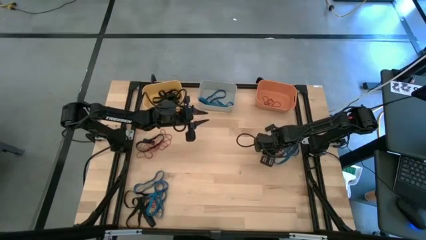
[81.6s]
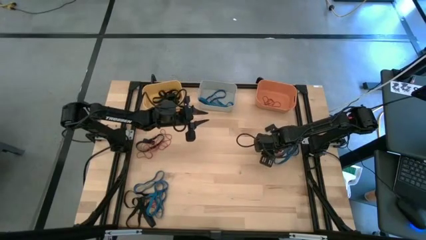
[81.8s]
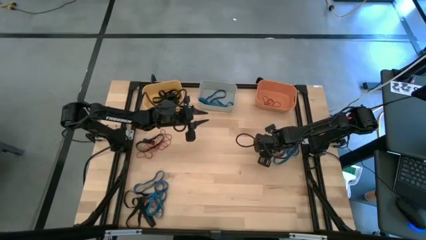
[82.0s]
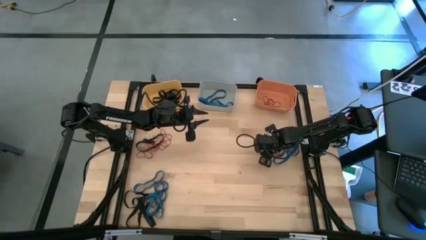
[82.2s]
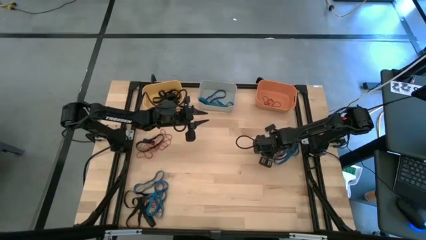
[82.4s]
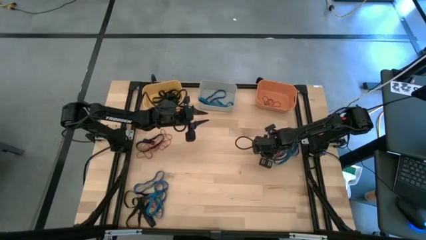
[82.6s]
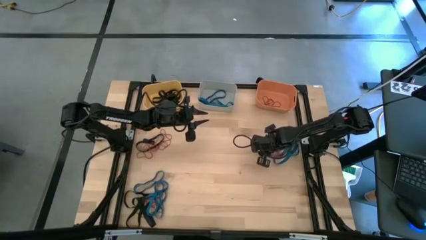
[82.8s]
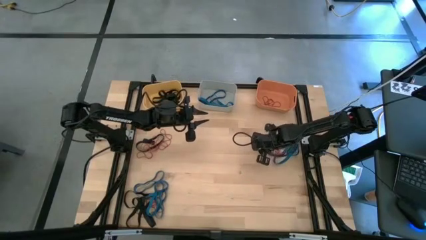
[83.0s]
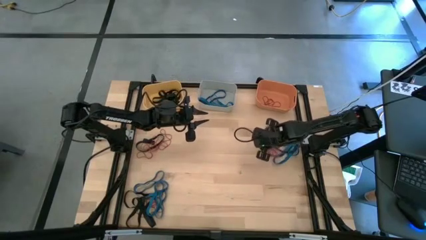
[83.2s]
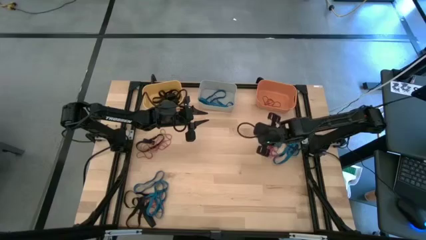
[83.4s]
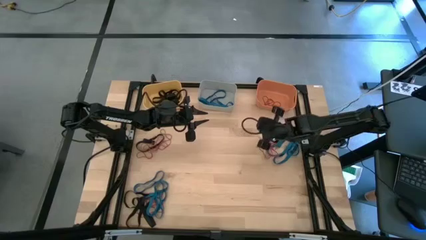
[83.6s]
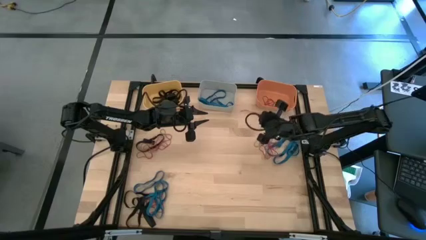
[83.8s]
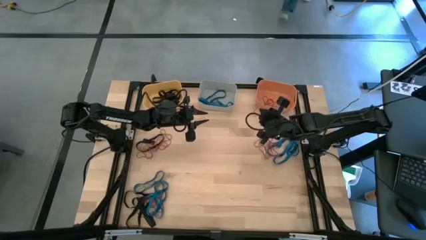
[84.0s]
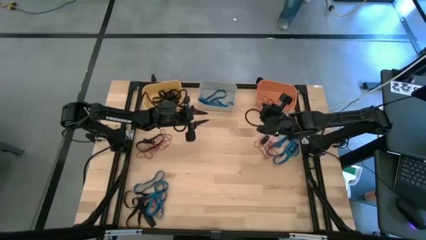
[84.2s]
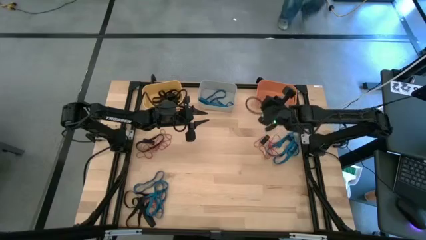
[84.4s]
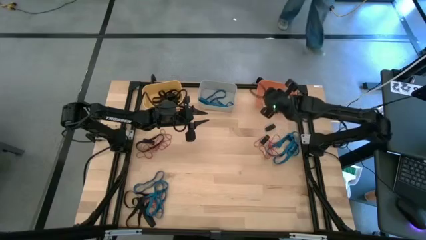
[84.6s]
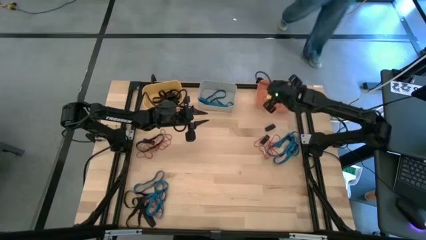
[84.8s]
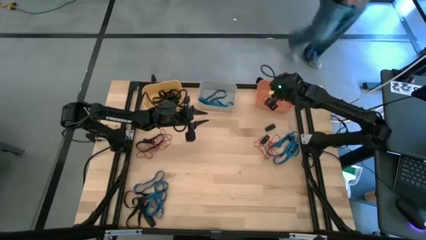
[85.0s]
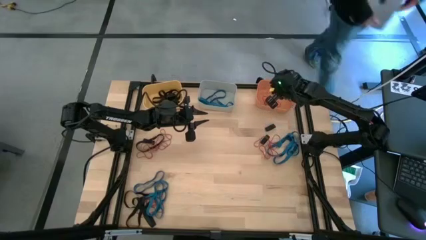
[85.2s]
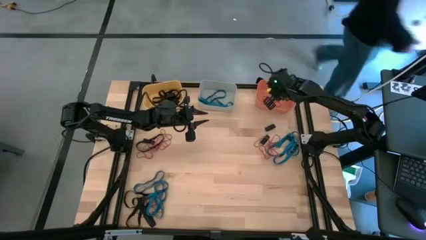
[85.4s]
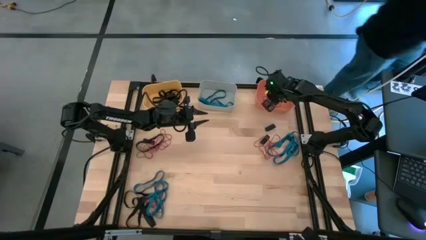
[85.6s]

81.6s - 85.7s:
Task: Sort rubber bands into baskets
Put the red rubber band into the orange bin

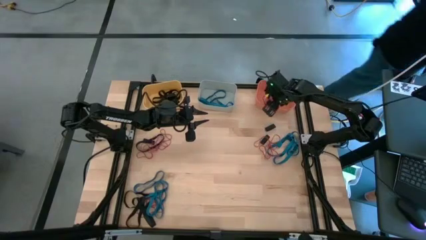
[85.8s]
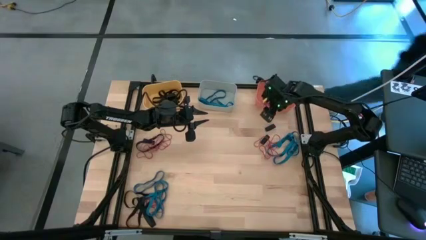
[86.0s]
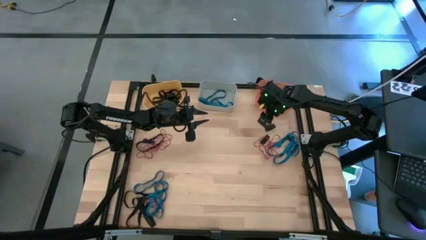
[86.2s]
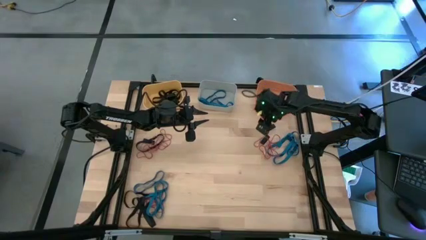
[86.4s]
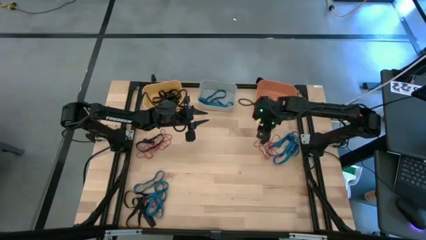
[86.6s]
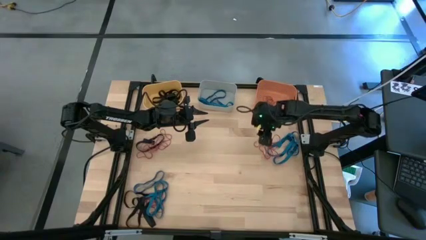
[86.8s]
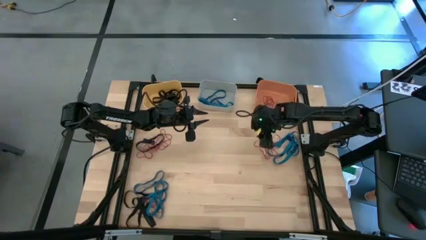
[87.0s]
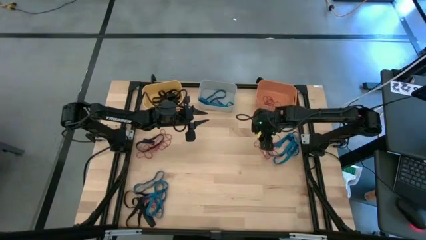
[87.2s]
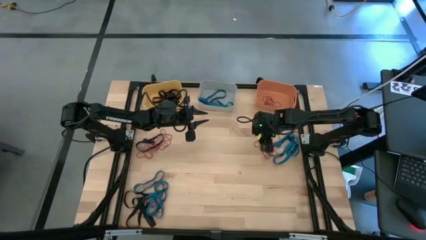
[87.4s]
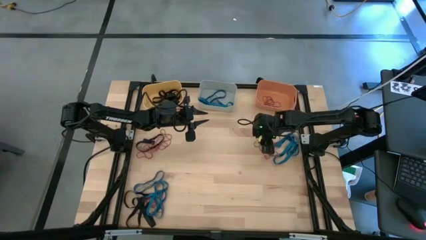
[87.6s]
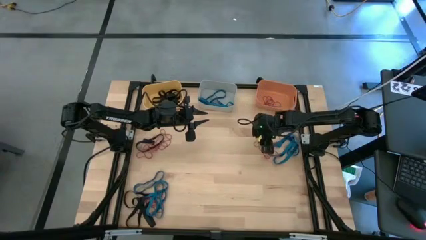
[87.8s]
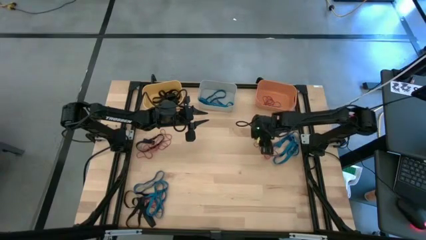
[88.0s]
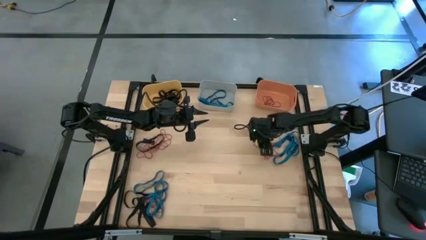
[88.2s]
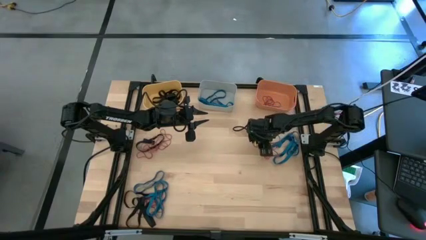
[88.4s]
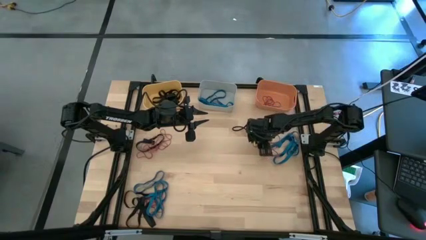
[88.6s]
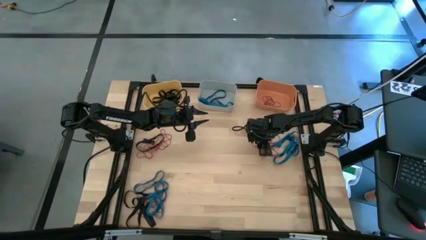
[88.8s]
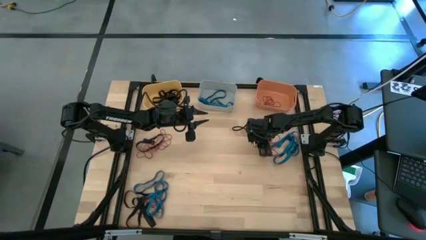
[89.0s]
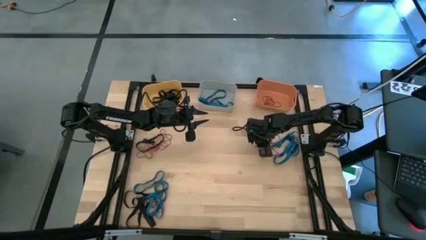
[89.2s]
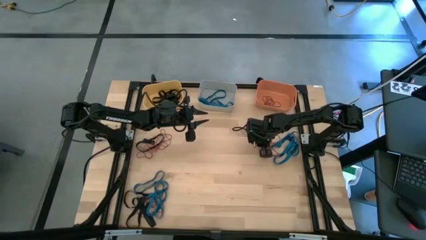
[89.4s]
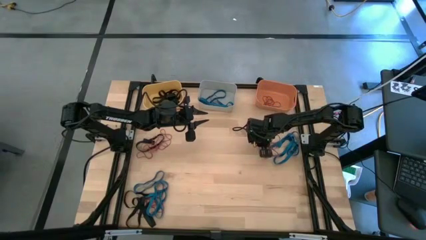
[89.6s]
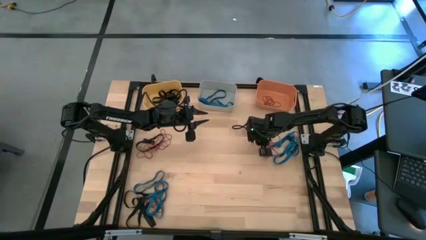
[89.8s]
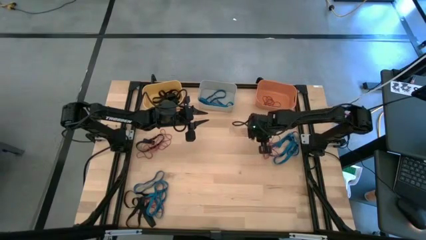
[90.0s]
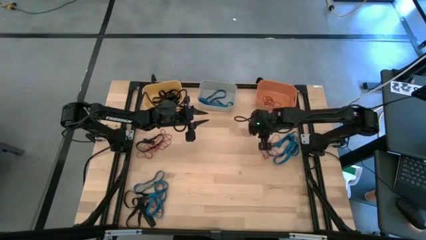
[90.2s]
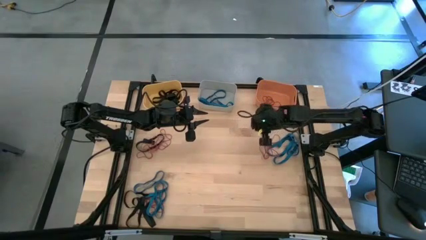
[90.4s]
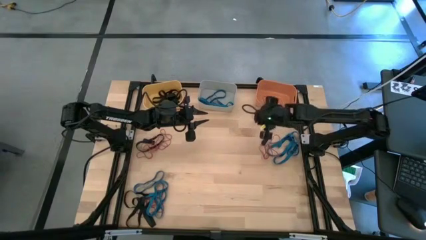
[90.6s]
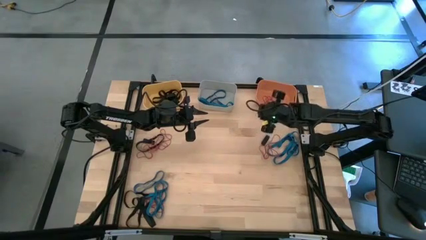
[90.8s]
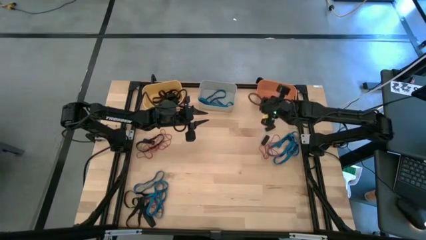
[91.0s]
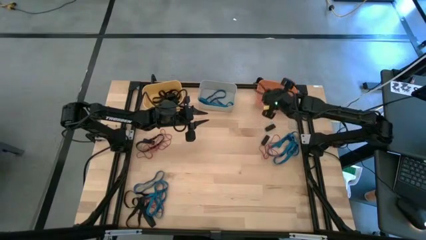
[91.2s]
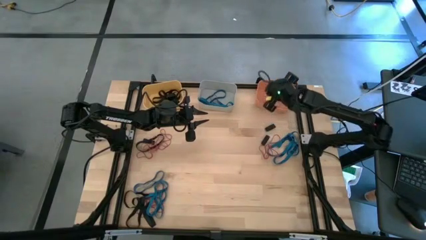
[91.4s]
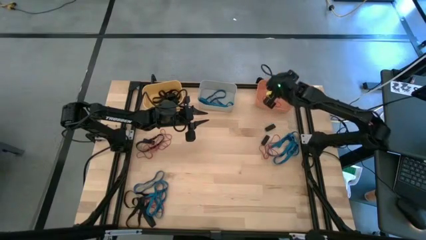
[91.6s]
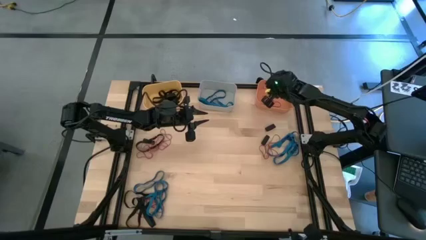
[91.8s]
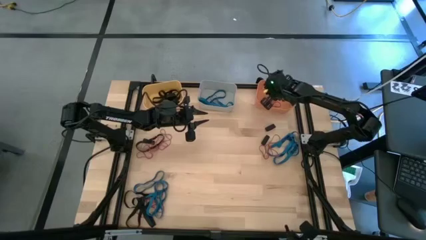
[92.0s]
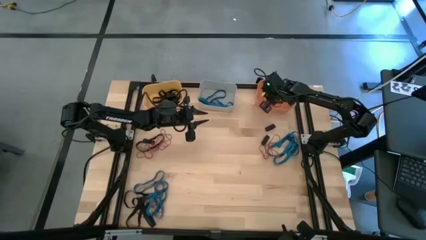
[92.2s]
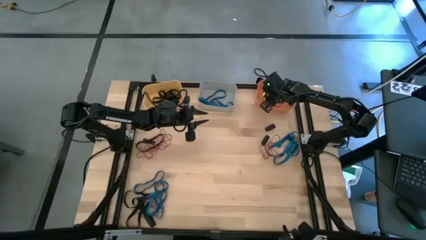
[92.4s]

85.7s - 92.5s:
Put the red rubber band into the orange bin

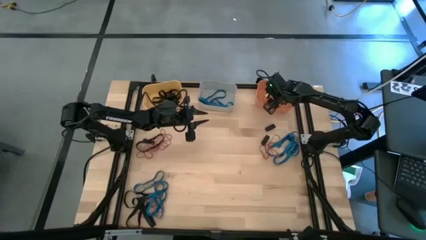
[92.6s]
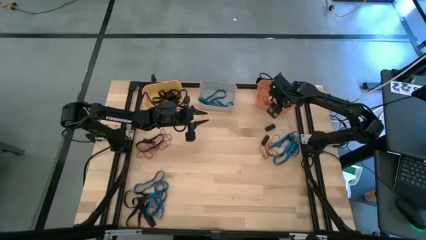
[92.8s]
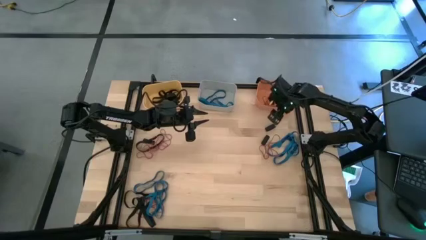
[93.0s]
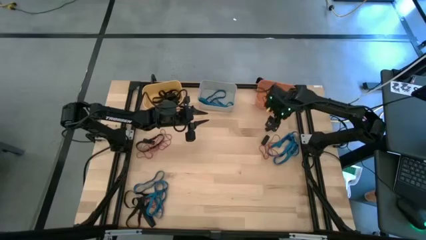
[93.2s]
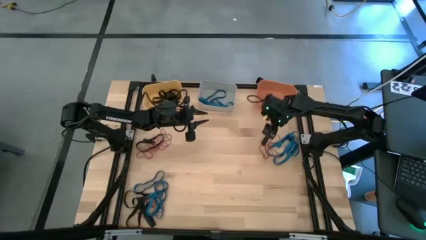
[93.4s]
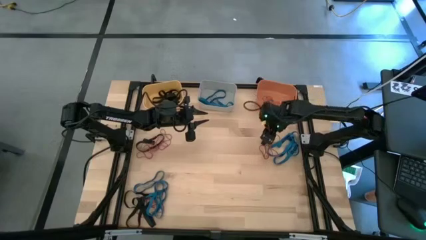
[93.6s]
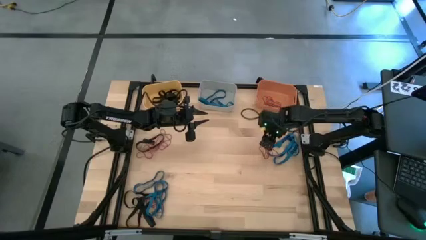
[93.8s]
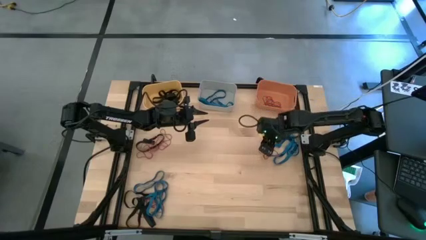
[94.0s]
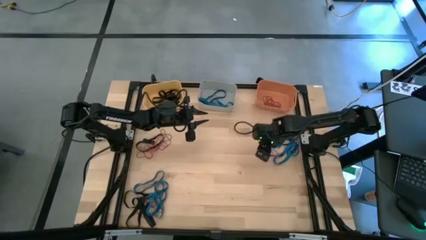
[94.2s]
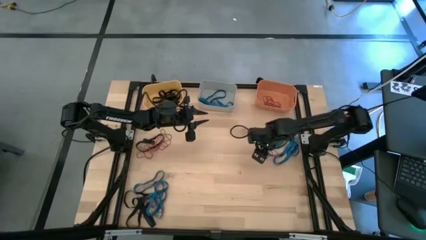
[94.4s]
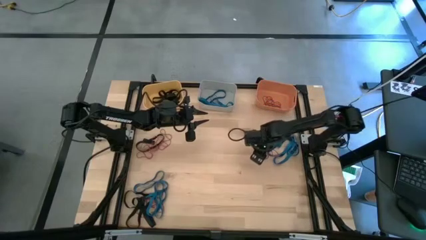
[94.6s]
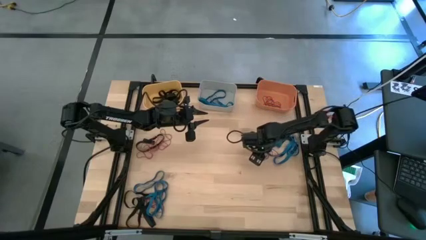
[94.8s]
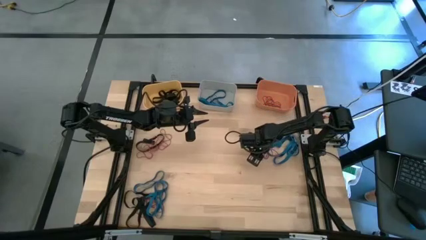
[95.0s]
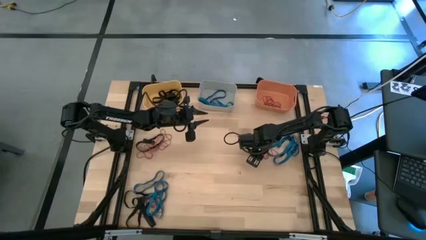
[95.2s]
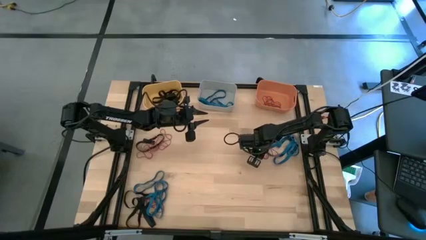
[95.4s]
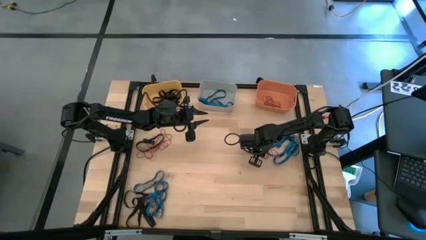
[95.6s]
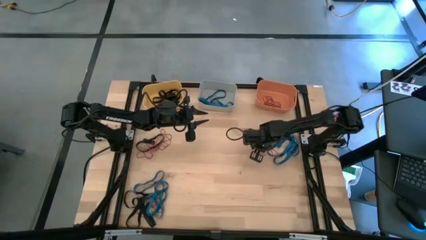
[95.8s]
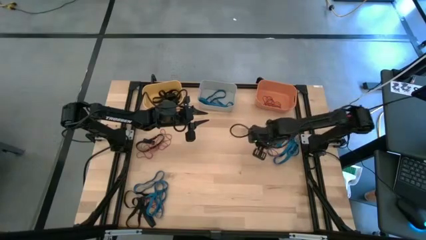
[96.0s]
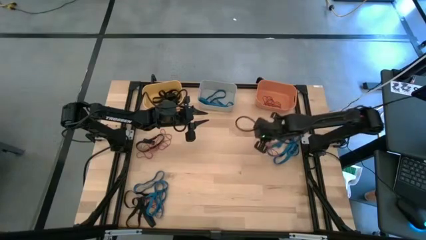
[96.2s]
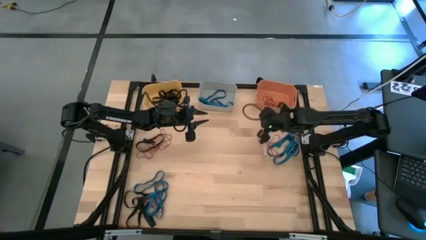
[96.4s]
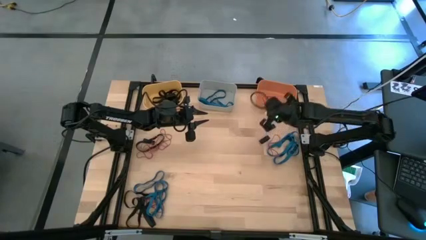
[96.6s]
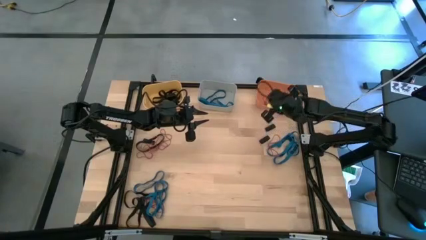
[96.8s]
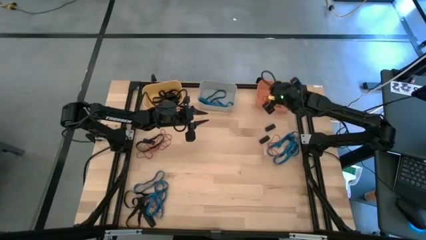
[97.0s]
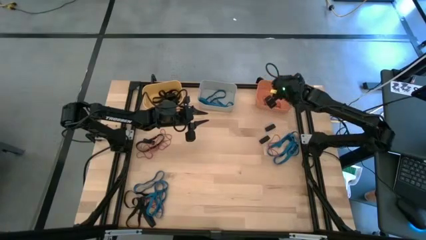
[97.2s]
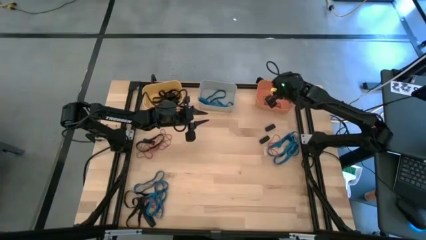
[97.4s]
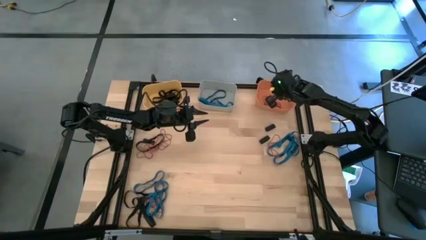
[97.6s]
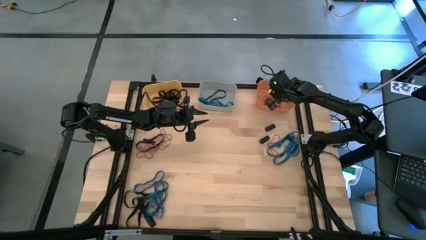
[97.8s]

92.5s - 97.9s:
Put the red rubber band into the orange bin
